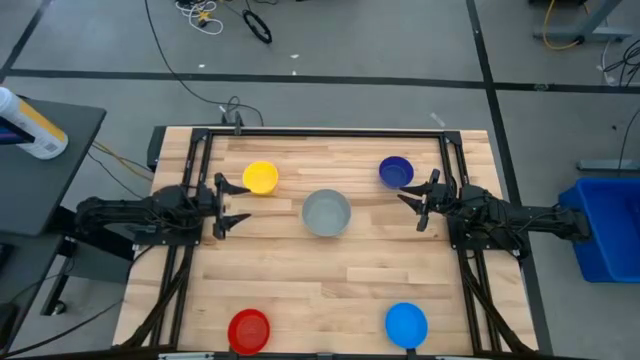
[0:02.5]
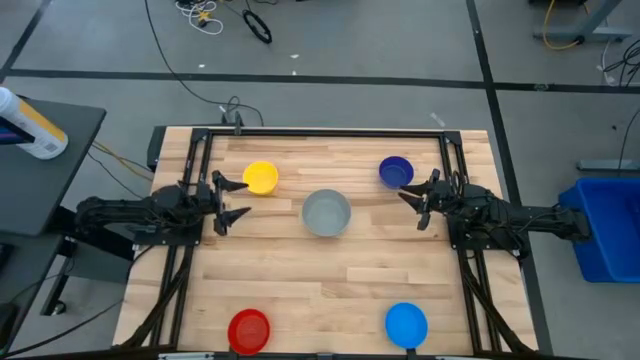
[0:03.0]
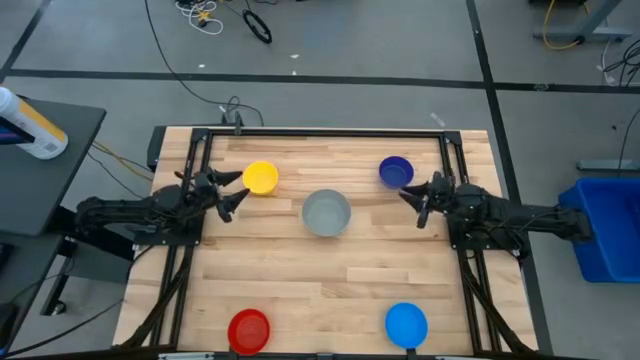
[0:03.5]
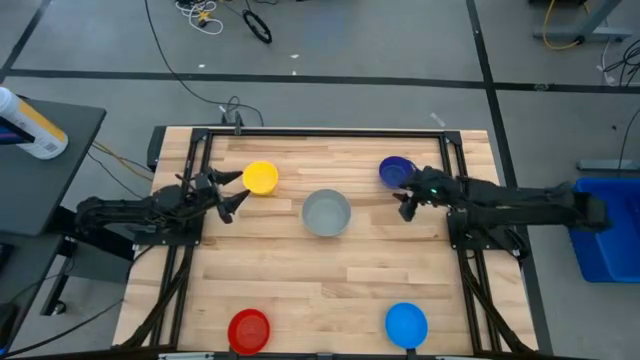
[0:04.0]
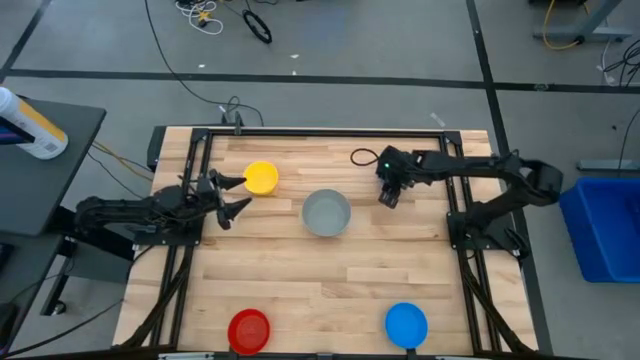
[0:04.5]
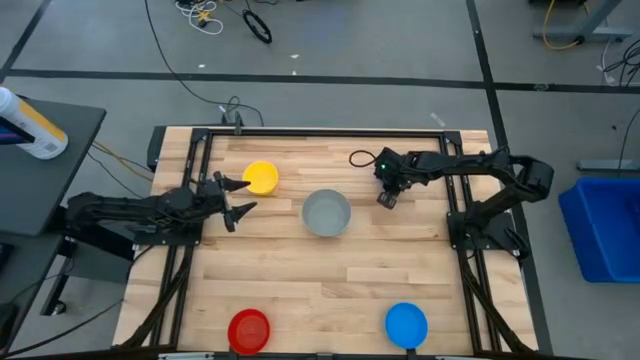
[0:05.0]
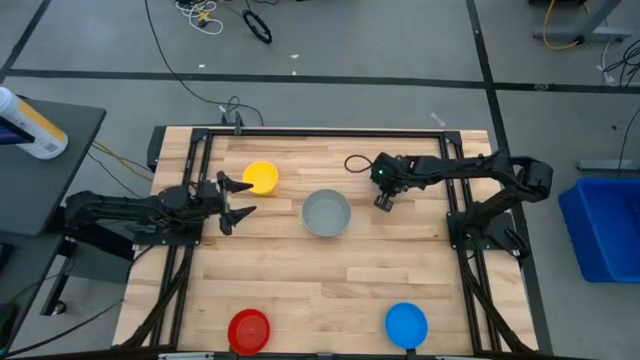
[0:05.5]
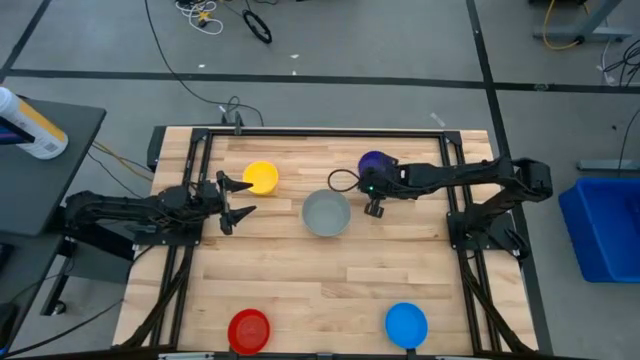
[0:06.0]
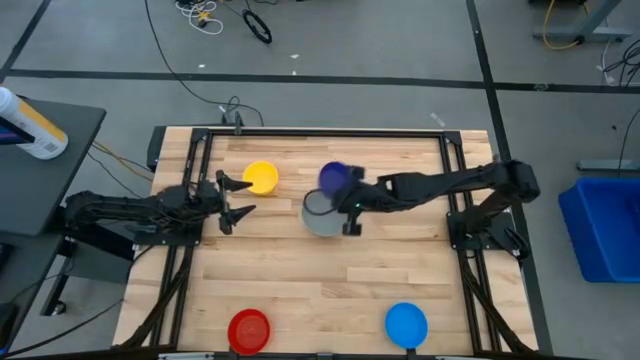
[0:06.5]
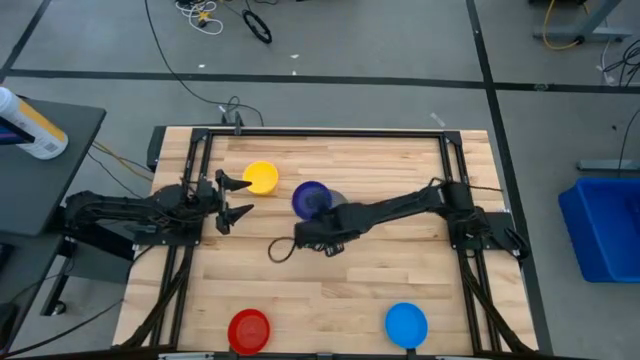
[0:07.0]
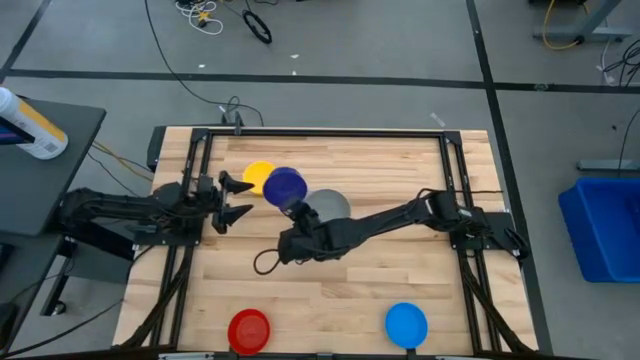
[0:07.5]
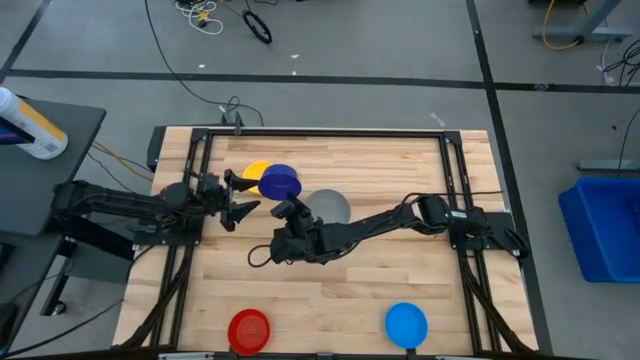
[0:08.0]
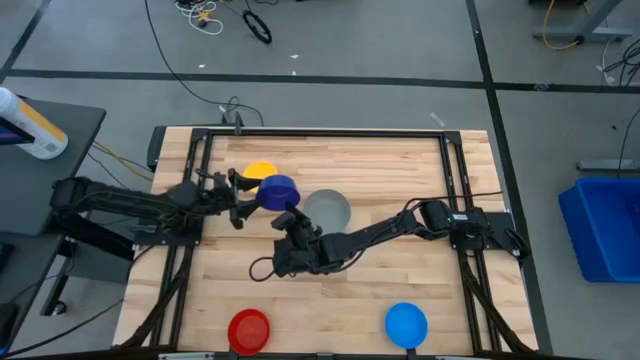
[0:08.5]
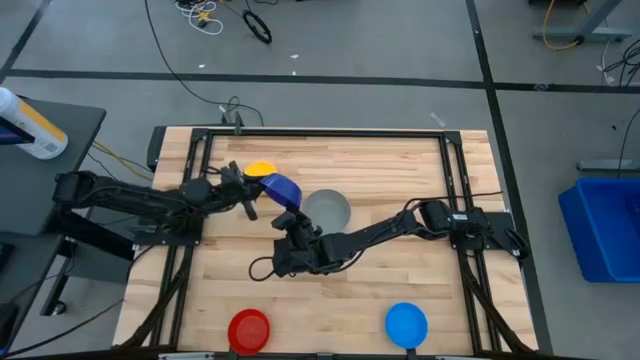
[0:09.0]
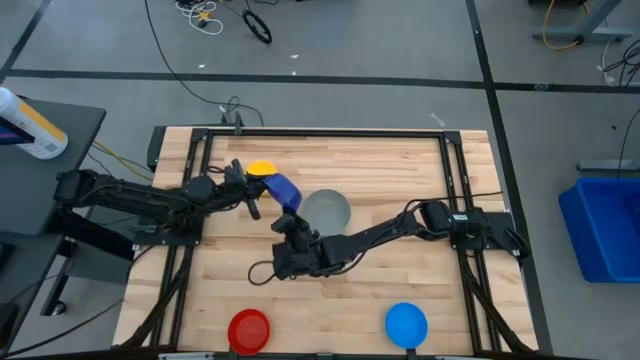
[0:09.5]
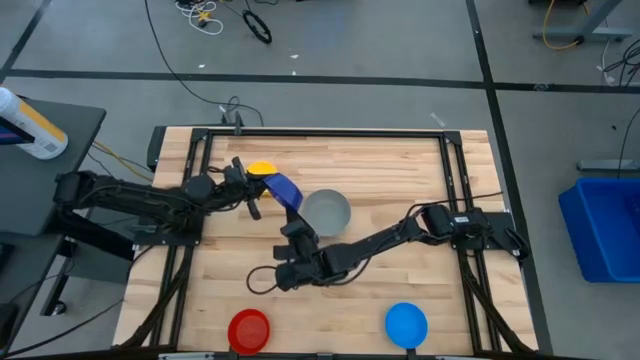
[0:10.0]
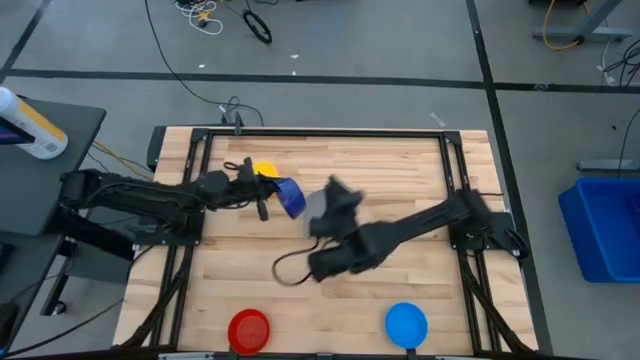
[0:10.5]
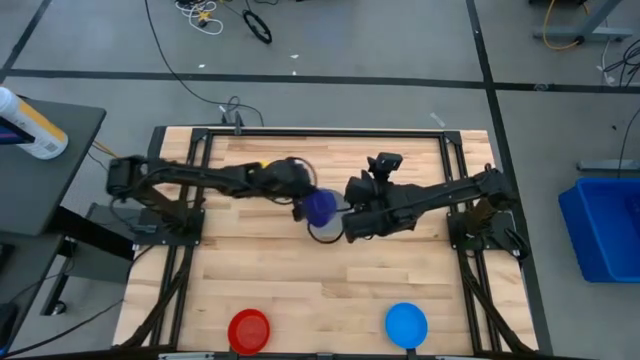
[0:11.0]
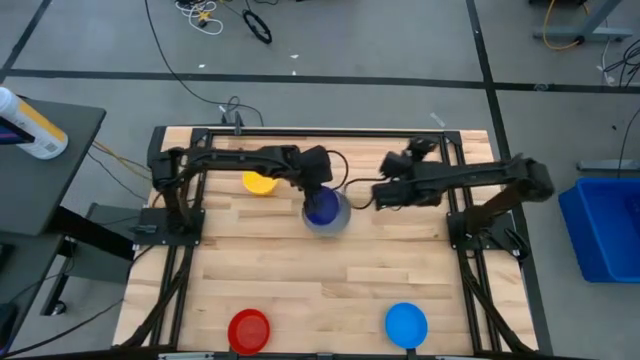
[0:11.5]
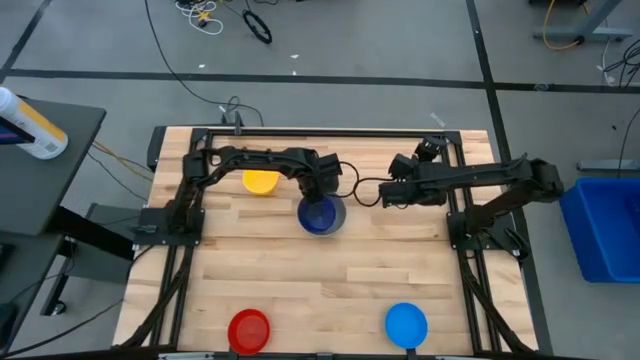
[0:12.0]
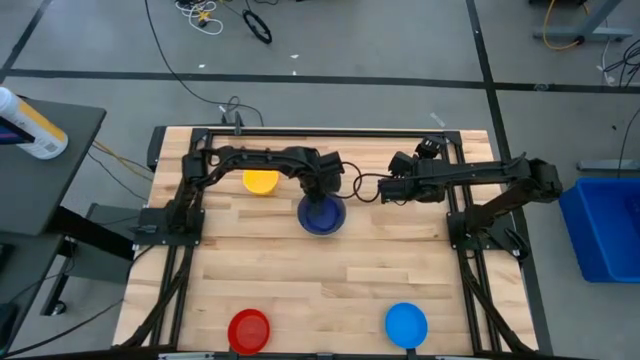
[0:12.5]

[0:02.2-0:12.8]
Stack the dark blue bowl in the gray bowl

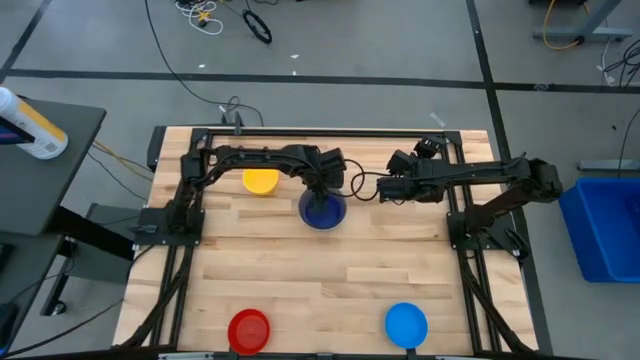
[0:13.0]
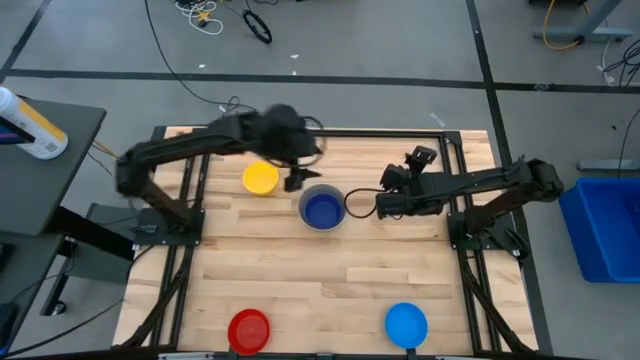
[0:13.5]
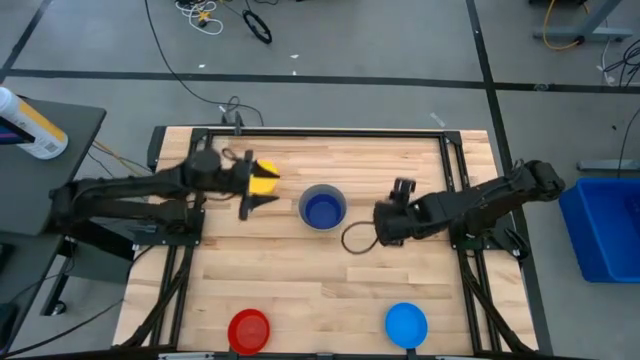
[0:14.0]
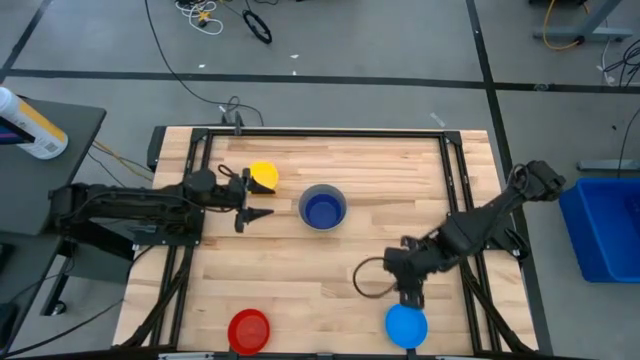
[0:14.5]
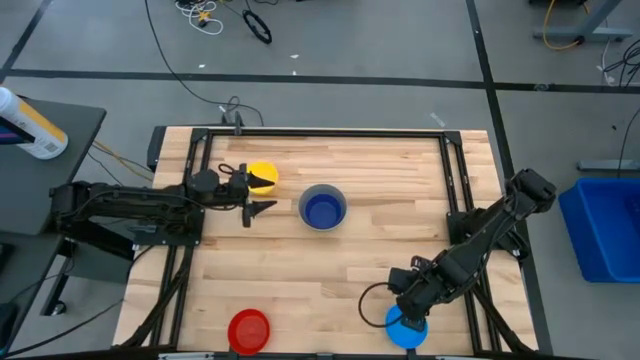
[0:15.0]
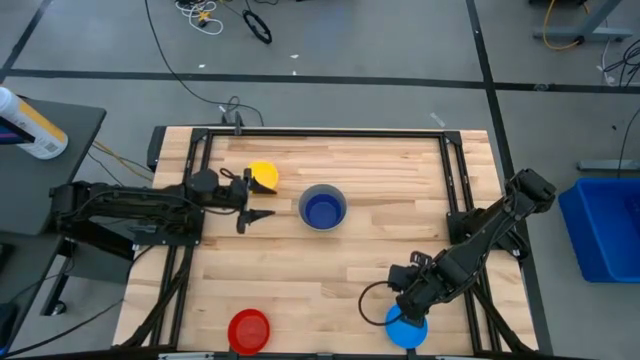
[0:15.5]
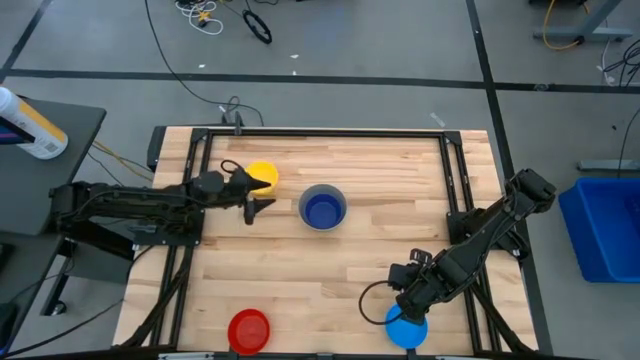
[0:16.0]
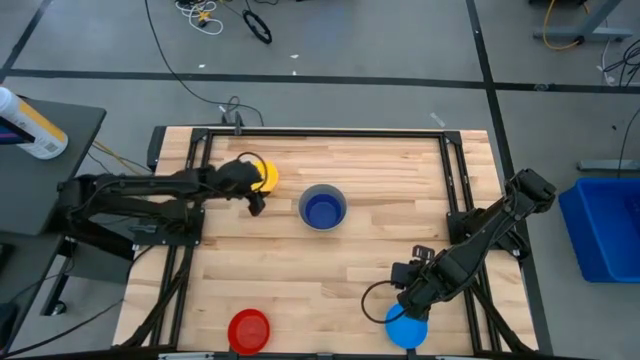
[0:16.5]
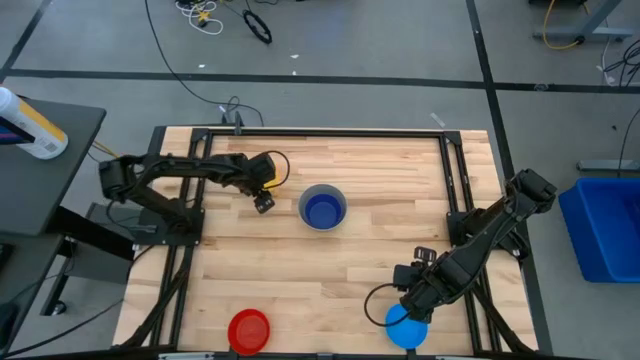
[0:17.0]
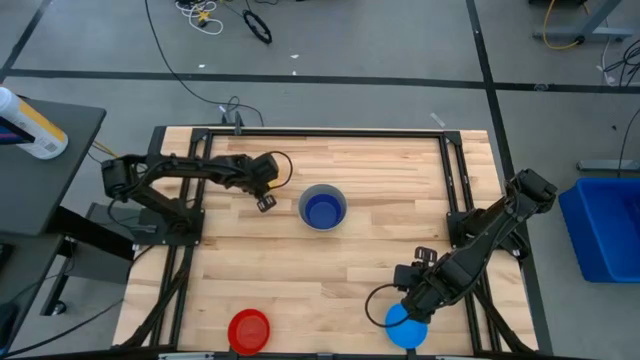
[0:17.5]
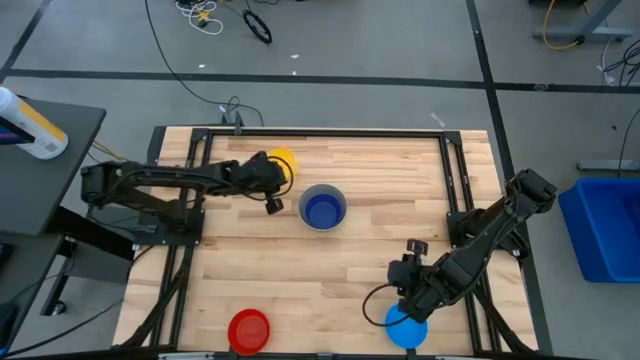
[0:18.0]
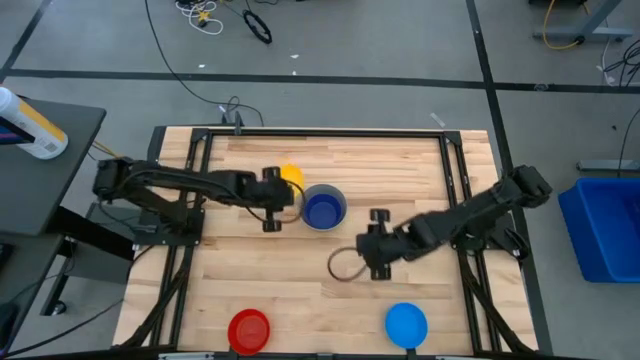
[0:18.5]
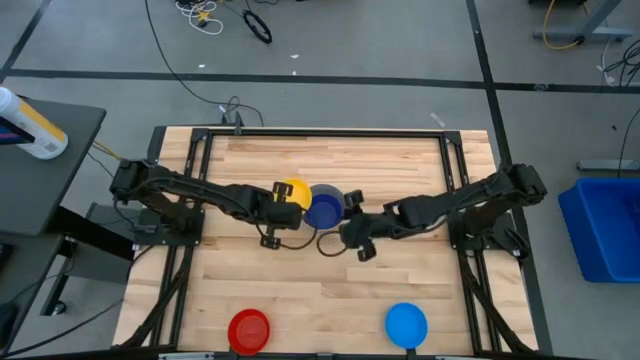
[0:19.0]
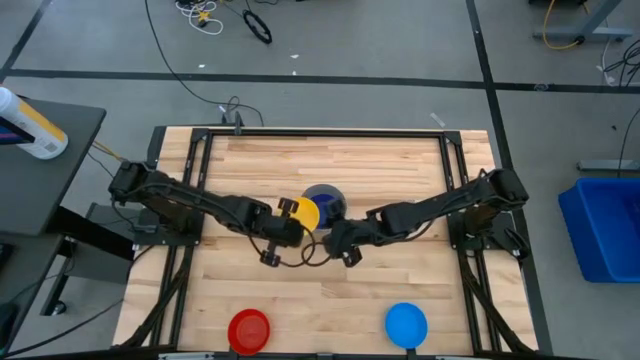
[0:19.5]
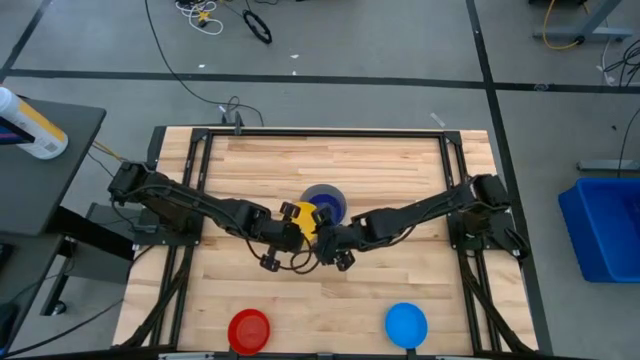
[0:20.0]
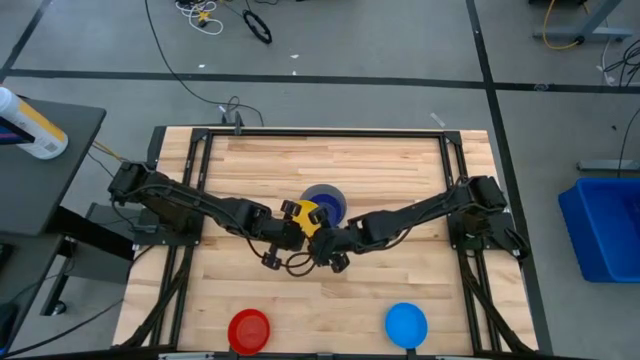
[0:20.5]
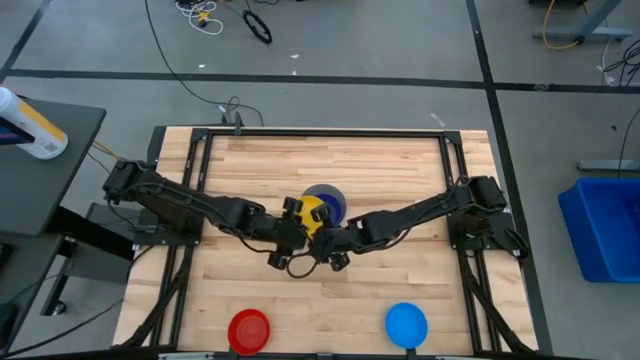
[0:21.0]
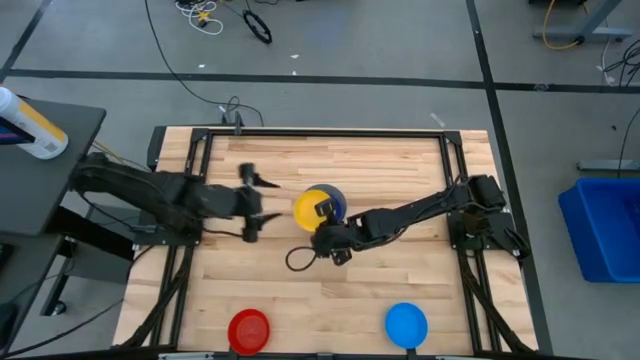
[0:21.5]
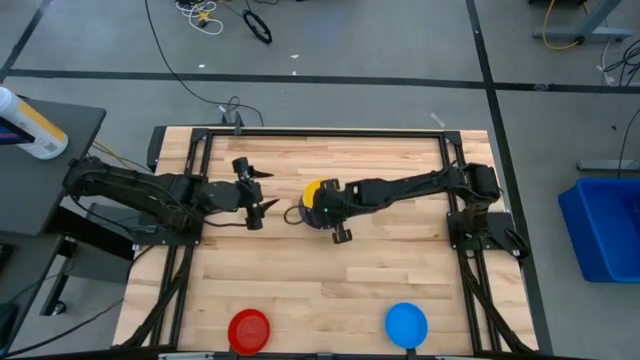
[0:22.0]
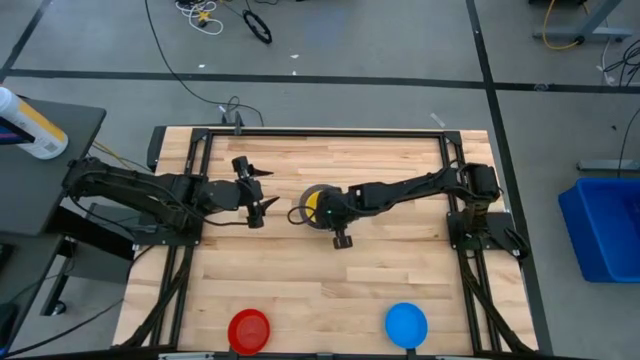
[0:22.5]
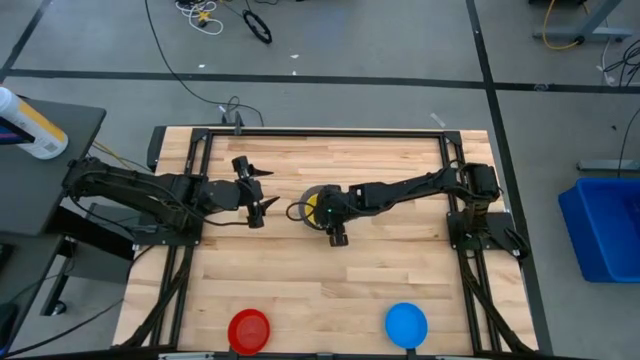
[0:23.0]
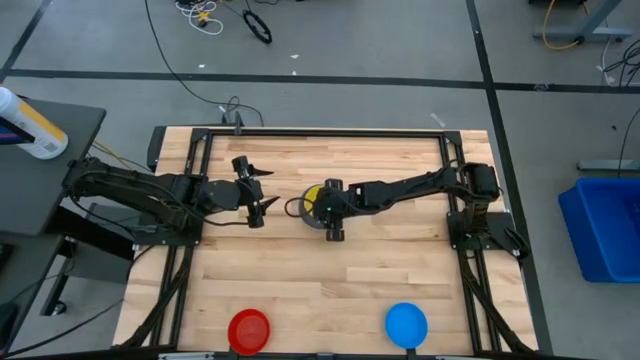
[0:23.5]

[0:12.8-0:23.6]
Stack the yellow bowl in the dark blue bowl
